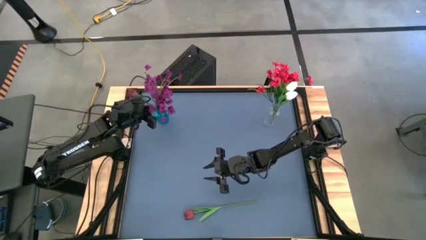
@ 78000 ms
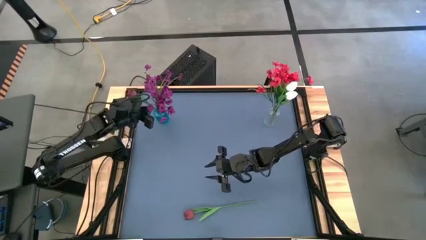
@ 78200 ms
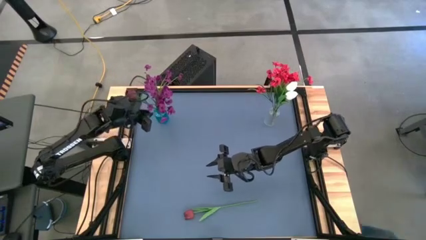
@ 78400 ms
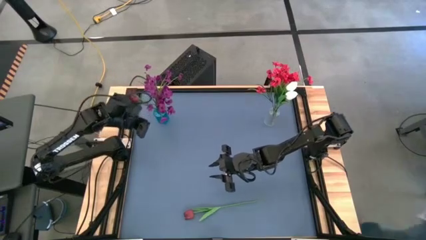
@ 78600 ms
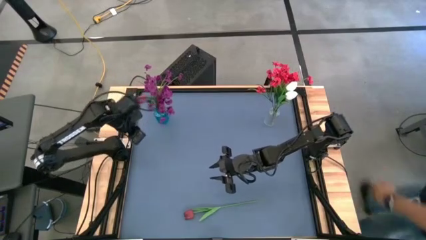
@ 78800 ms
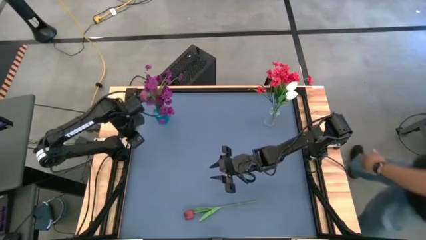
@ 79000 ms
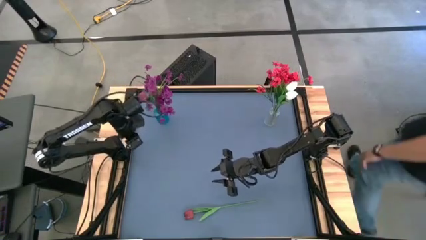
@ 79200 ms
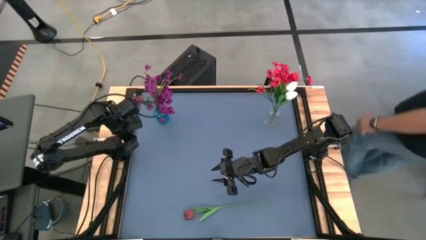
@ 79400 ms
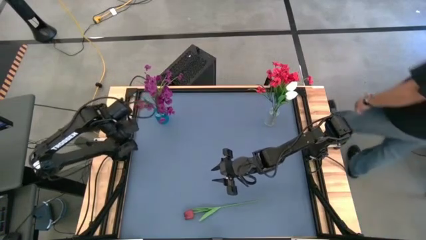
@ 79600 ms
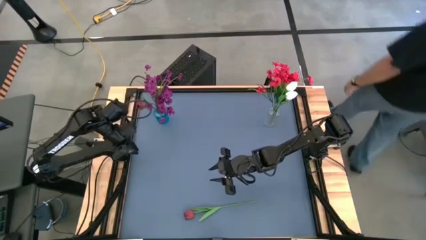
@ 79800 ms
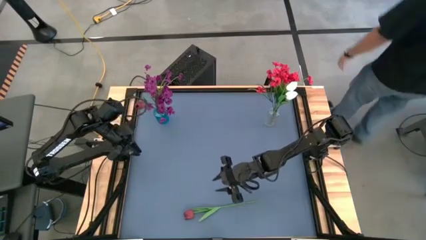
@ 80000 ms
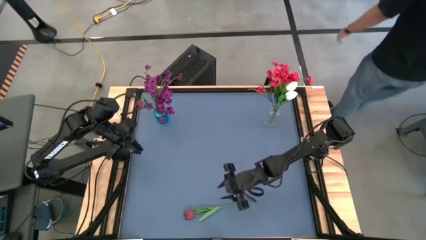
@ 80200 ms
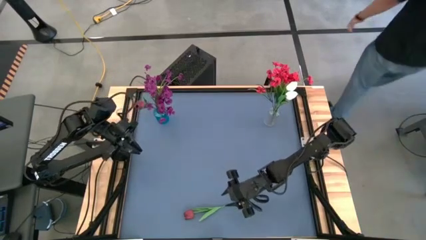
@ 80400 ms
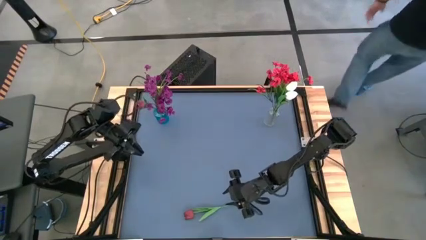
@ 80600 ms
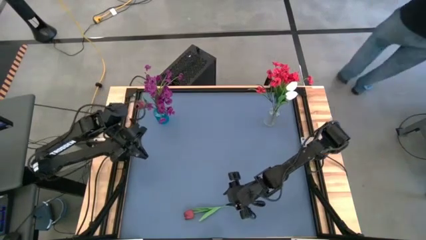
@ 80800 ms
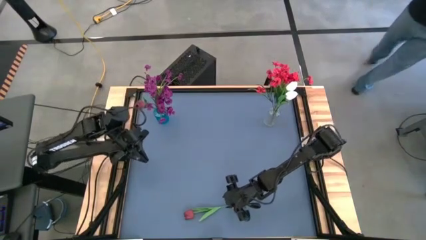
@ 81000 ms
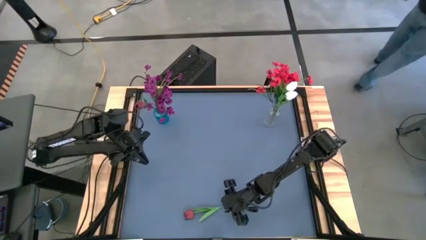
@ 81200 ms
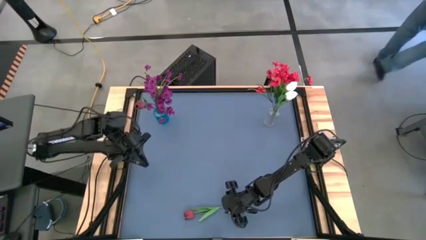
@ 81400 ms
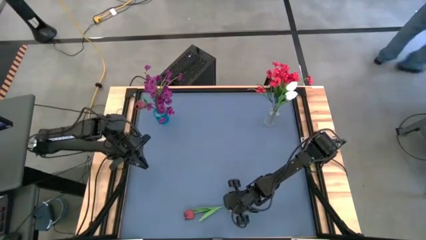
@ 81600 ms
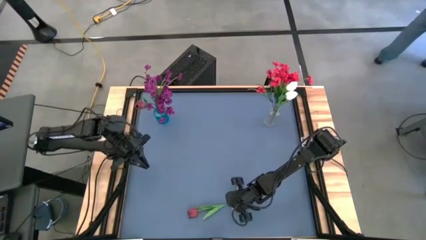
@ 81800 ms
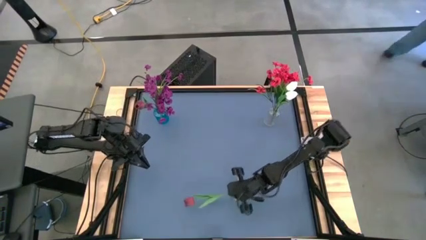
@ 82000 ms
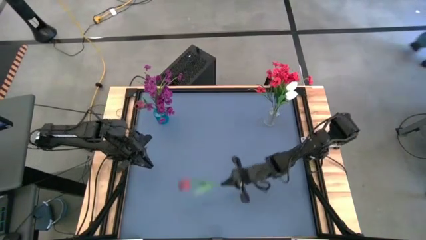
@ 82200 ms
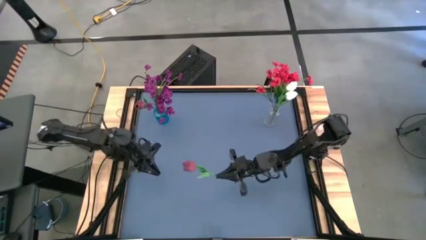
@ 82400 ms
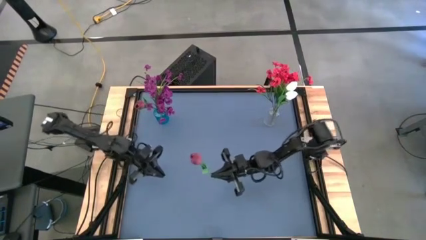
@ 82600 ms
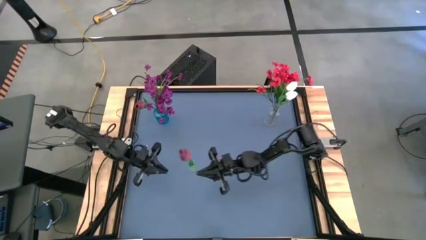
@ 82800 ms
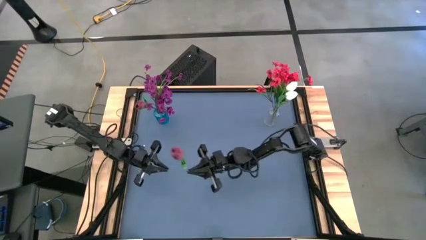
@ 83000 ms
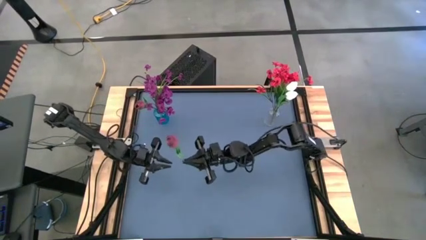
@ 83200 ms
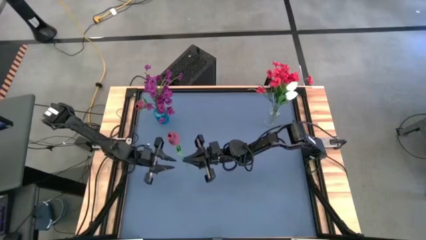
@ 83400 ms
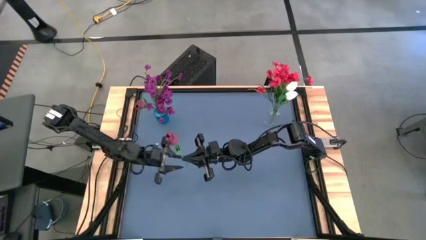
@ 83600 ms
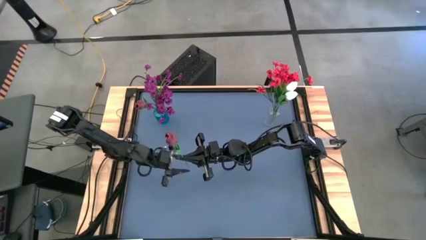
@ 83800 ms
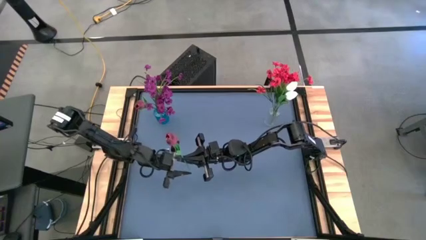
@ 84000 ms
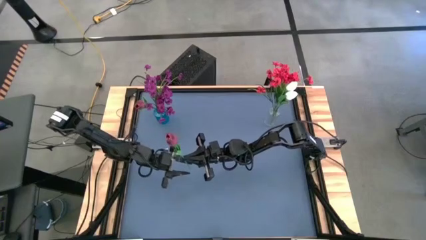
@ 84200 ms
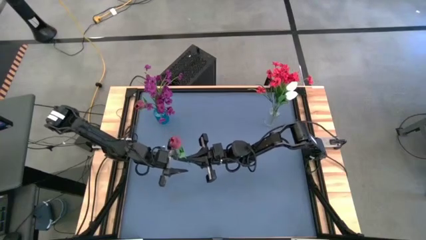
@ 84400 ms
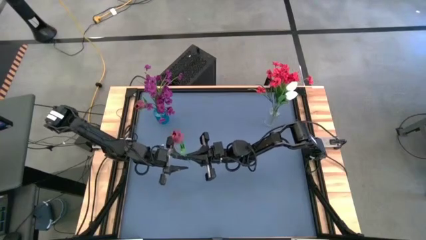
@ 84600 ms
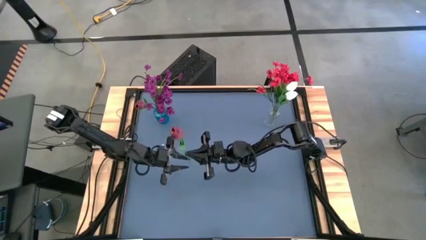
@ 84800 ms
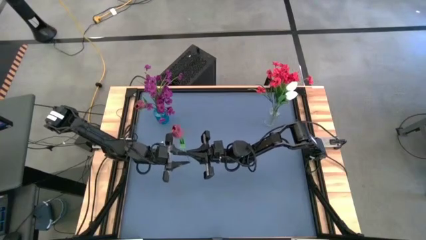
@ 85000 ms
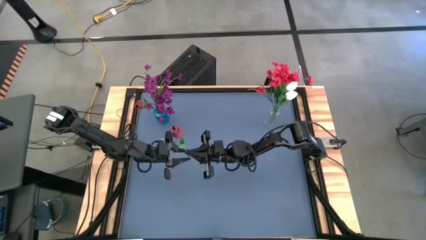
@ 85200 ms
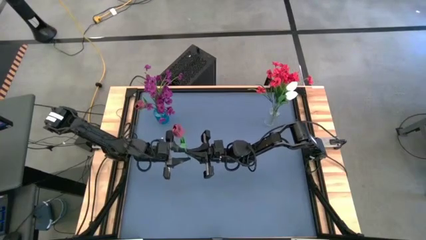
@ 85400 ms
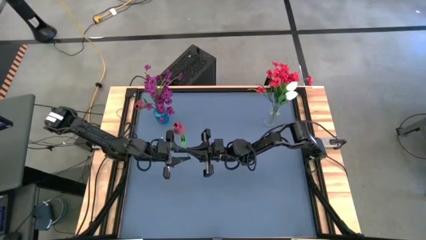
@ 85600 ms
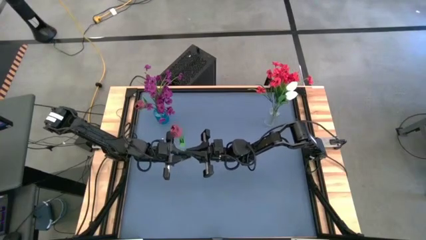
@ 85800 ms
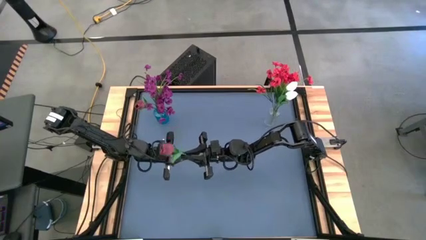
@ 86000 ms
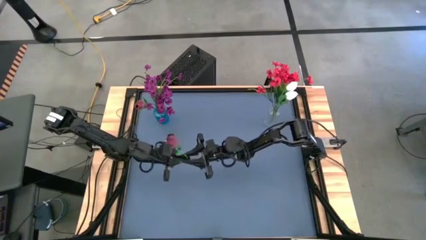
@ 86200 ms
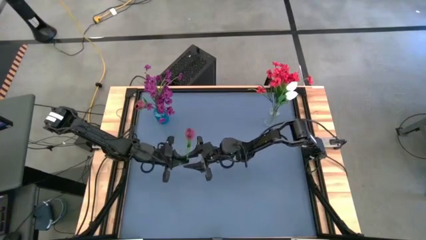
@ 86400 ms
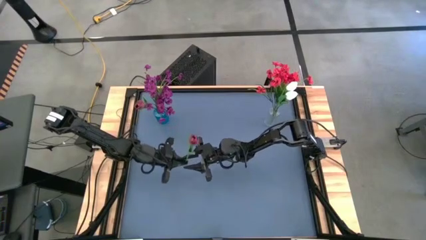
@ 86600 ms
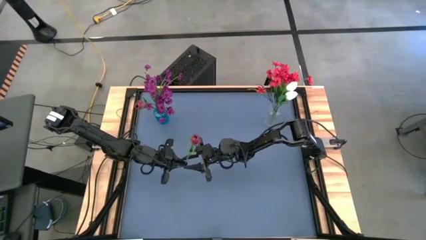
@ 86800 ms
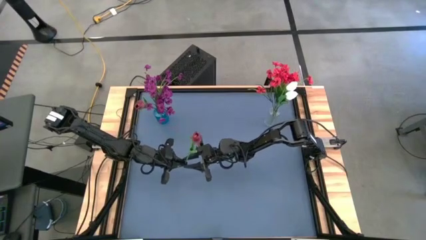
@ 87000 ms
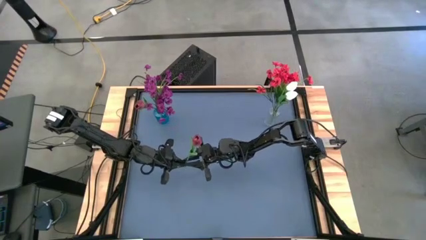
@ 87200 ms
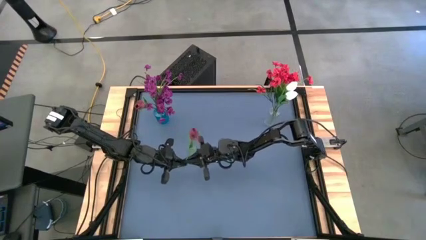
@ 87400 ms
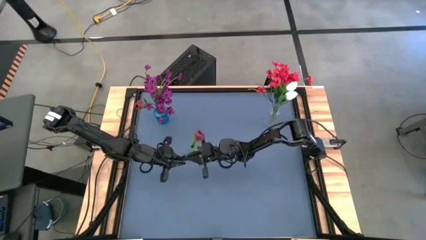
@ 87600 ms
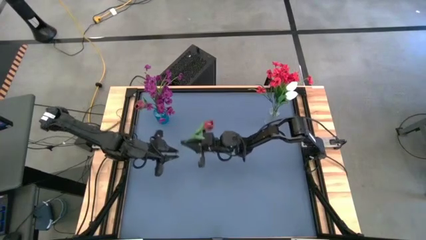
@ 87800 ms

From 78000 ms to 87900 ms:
Task: Sort flowers into vase by color
Put the red tulip into the blue vase

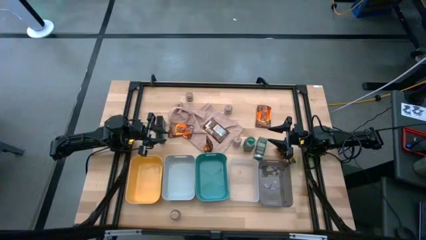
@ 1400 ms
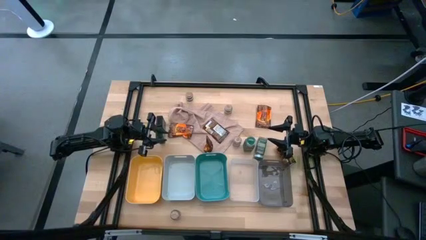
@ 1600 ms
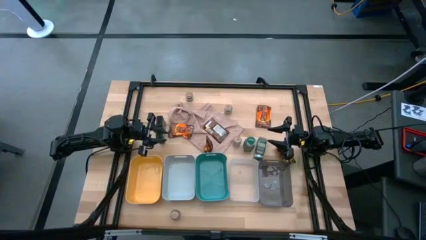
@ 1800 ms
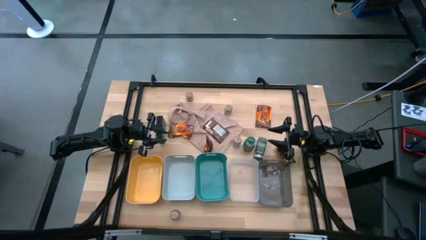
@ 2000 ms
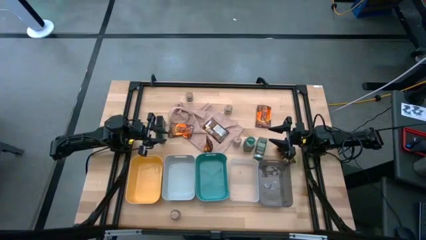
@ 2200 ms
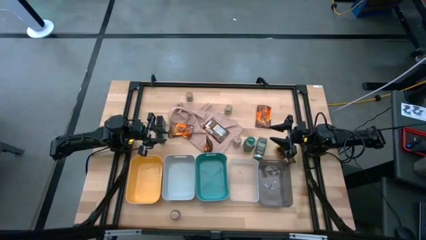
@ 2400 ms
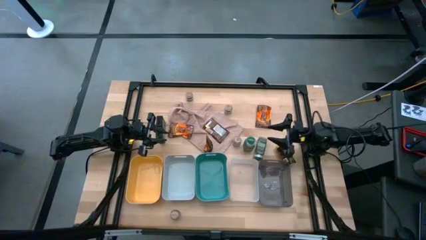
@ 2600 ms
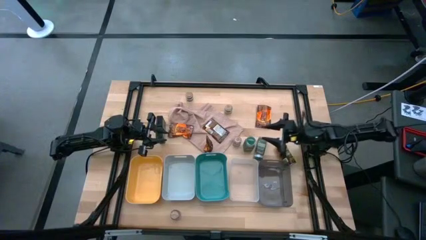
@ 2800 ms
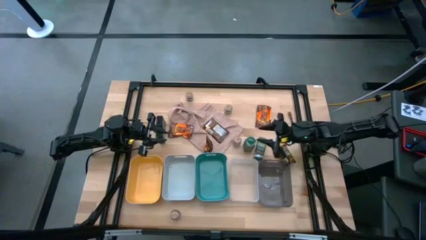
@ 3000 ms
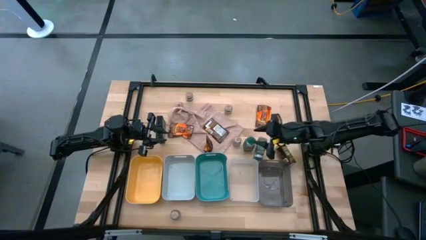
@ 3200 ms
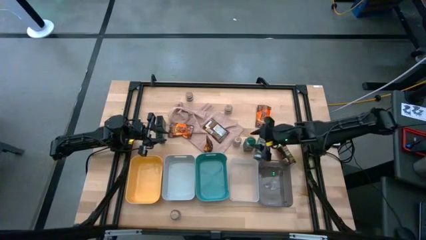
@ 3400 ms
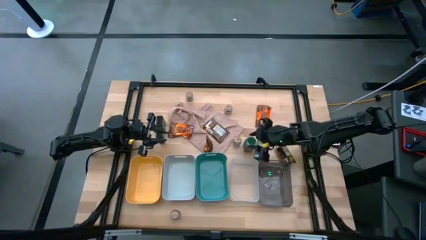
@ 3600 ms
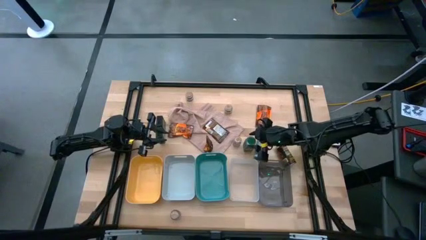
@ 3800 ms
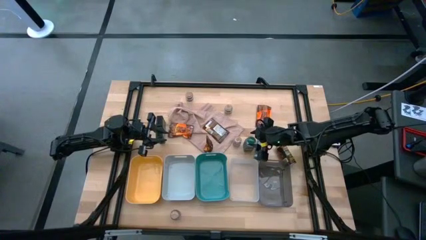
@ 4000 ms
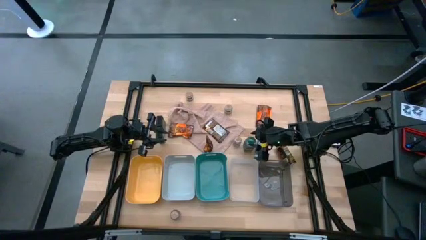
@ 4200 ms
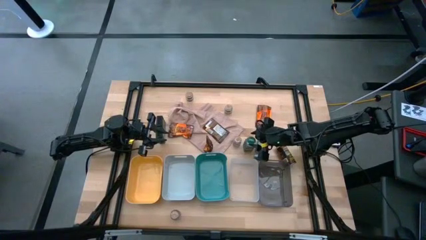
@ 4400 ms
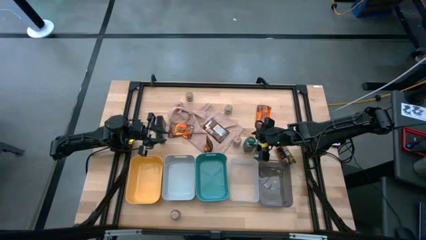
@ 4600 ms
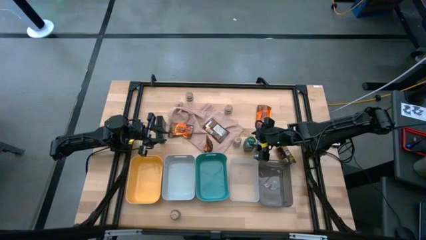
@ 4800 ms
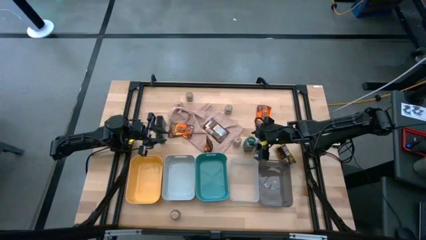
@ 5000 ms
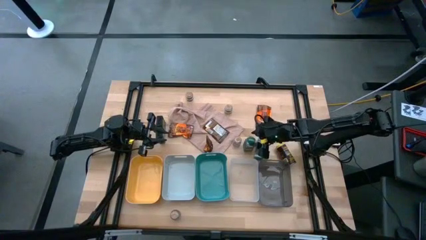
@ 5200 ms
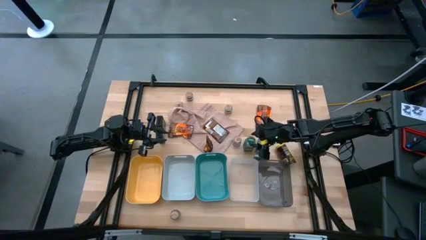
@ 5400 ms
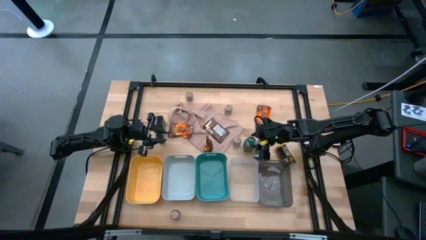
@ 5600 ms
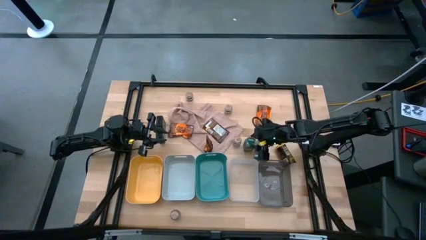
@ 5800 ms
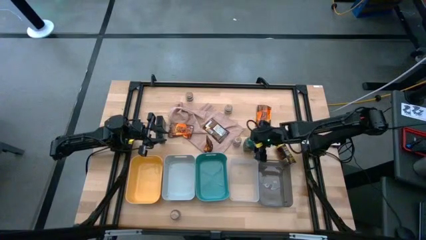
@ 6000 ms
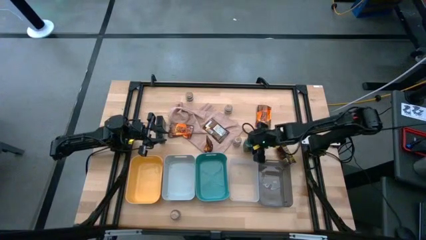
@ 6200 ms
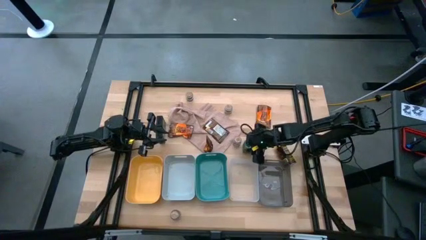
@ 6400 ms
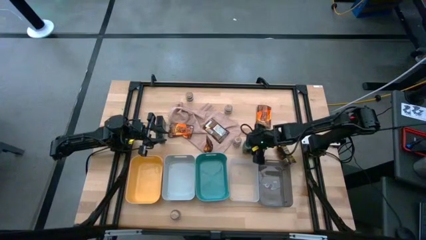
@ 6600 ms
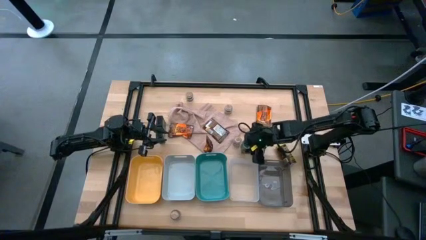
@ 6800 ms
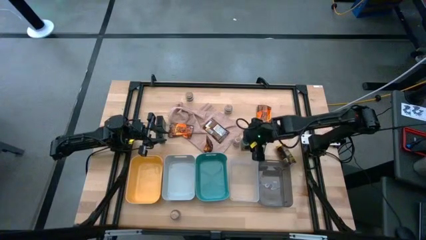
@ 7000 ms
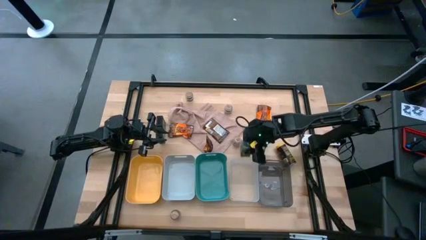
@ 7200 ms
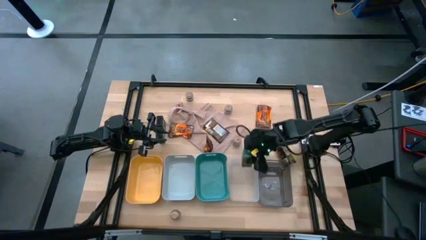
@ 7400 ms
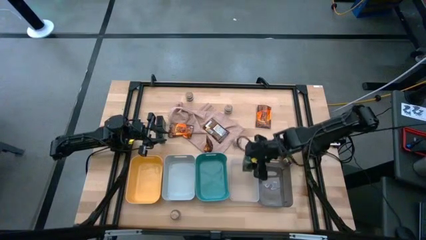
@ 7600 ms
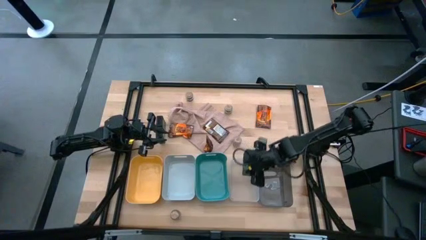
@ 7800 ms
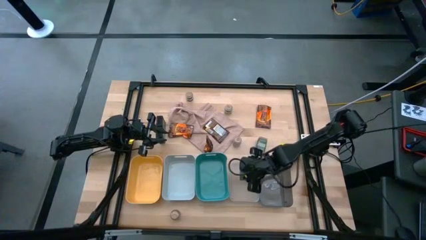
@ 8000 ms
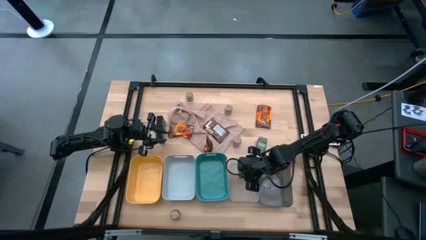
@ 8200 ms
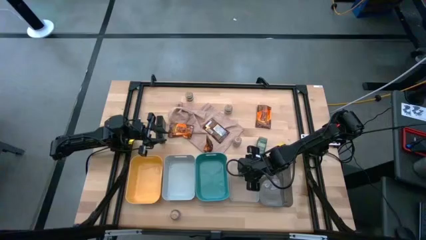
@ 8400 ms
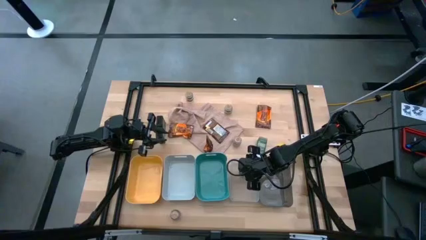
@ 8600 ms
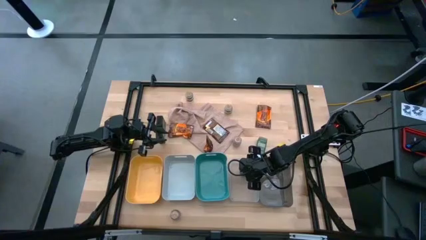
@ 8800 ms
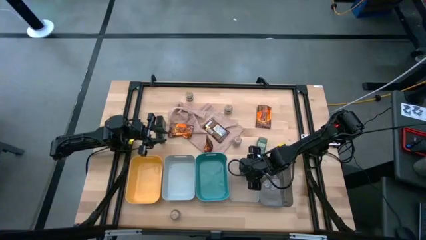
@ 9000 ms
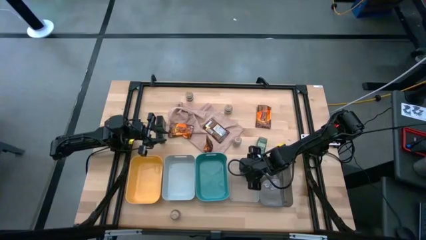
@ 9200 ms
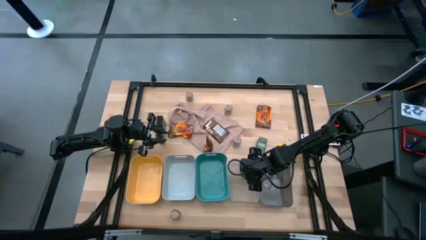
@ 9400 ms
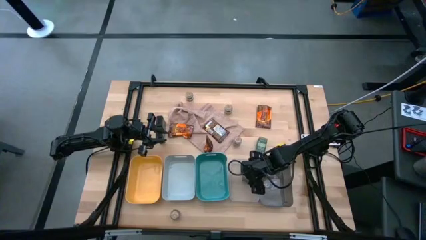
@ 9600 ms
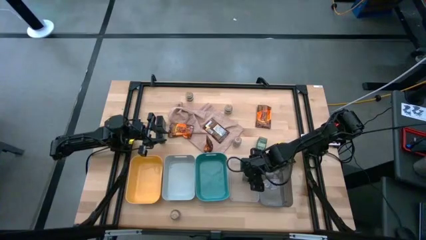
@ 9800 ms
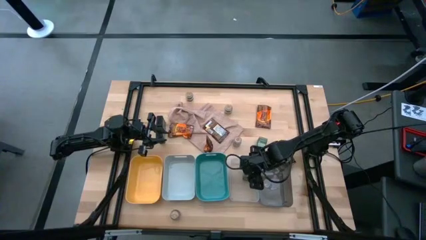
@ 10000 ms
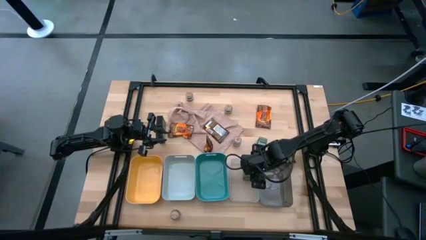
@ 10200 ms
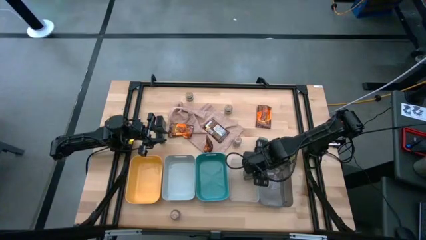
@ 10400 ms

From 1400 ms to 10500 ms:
Task: Sort spices by type
Put the green seasoning bottle into the transparent bin
